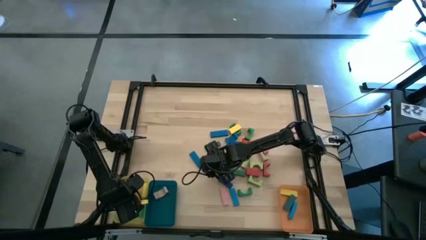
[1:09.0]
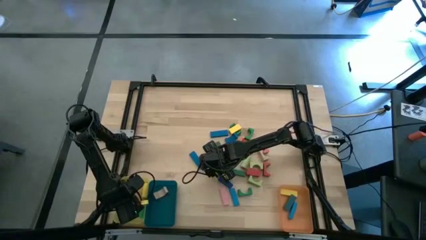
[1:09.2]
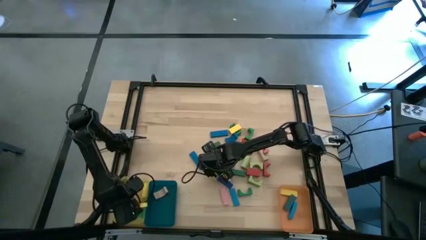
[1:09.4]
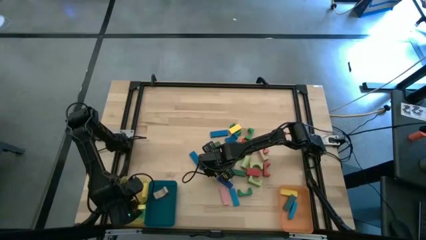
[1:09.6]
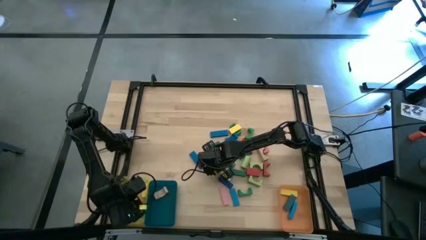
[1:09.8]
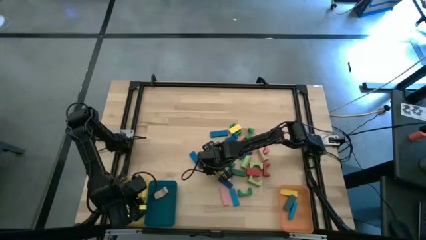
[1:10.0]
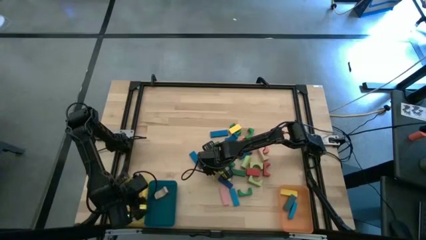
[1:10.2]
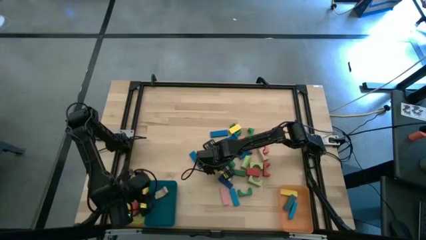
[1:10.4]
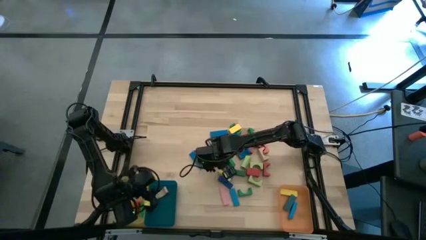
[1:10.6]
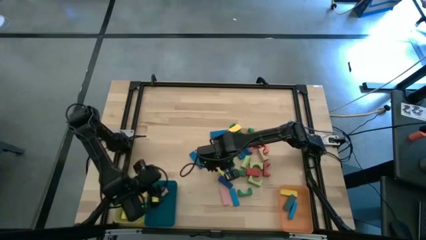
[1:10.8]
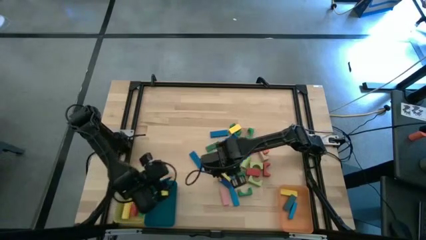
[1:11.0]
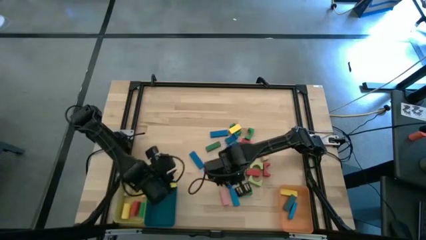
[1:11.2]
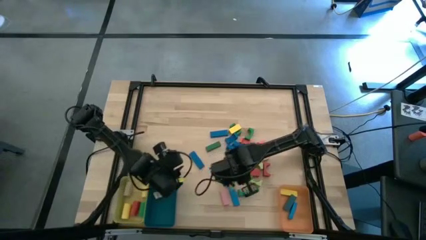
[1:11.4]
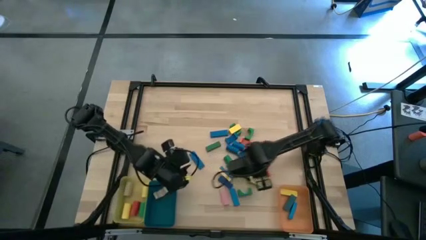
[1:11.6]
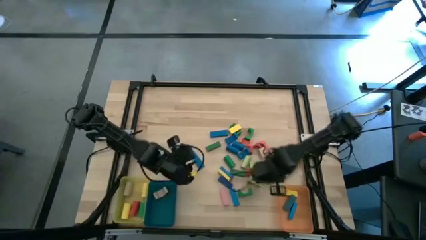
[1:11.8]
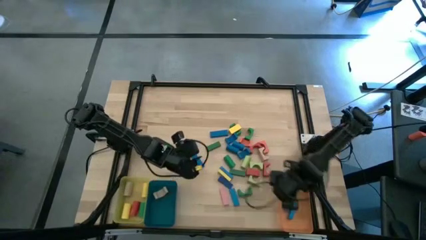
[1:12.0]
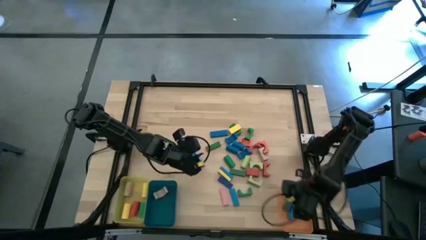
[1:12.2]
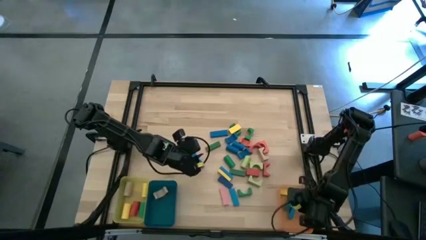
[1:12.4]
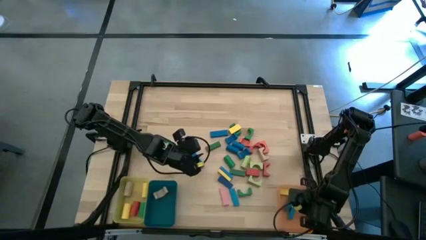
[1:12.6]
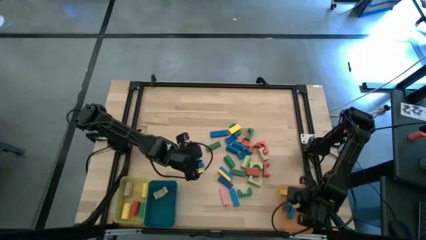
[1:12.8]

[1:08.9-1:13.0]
Task: Sort blocks by size
Put the blue rectangular block into the orange bin

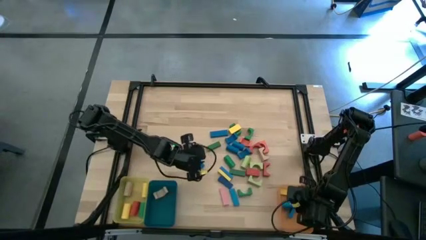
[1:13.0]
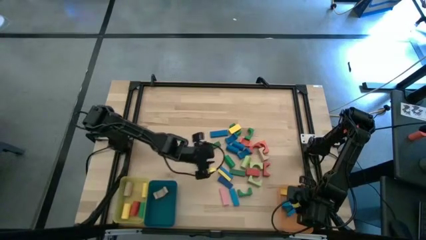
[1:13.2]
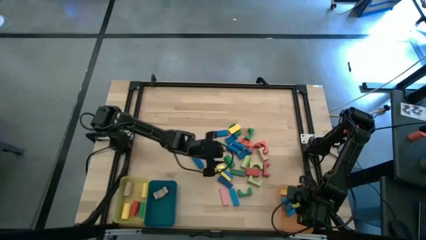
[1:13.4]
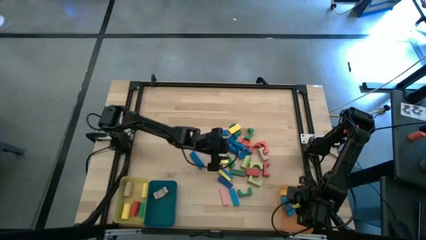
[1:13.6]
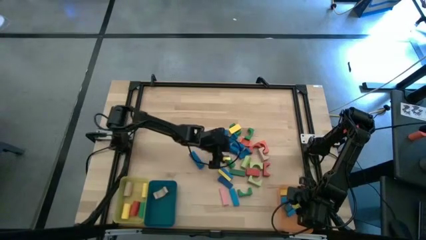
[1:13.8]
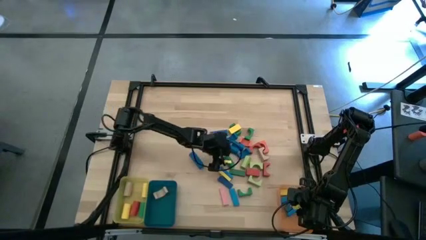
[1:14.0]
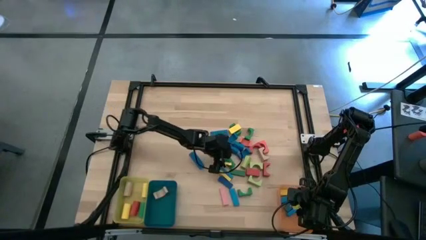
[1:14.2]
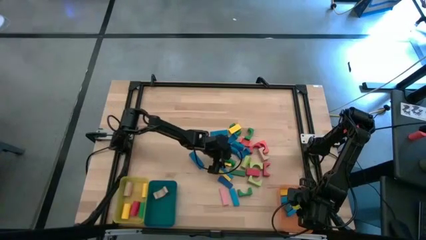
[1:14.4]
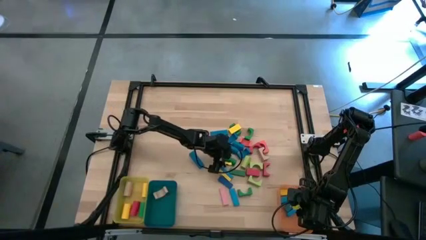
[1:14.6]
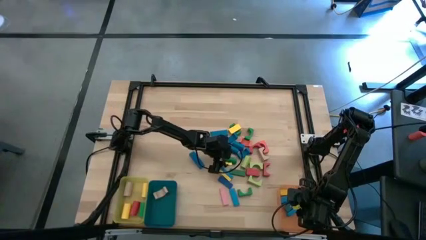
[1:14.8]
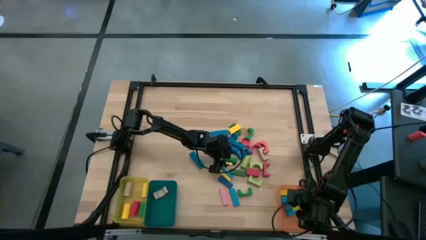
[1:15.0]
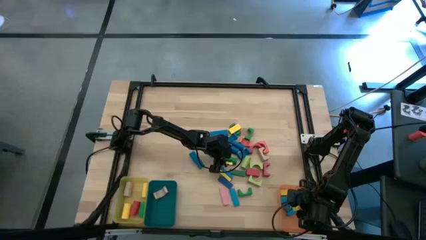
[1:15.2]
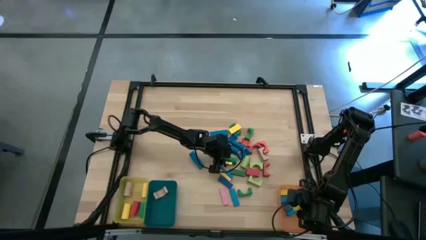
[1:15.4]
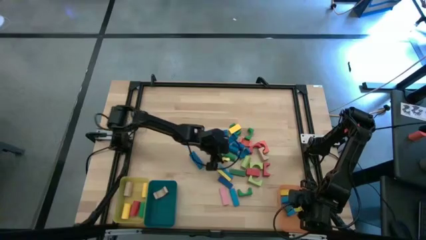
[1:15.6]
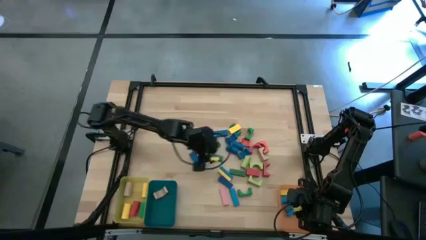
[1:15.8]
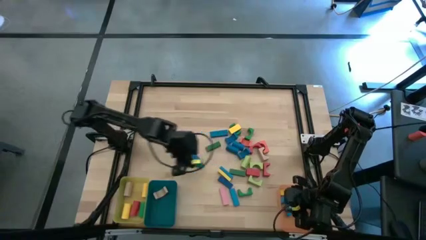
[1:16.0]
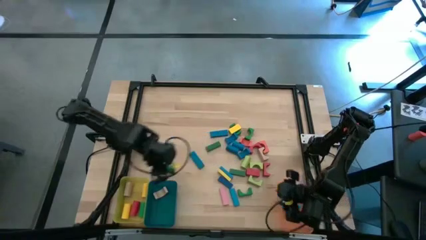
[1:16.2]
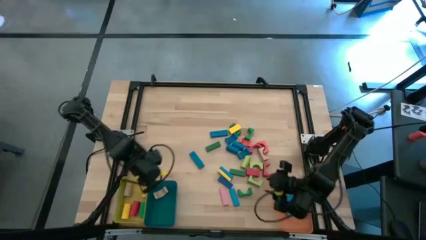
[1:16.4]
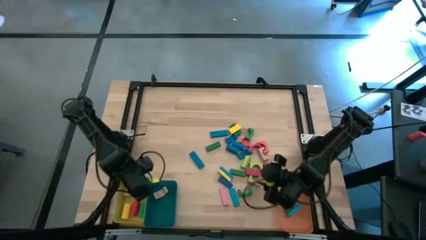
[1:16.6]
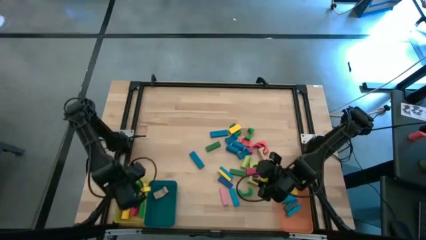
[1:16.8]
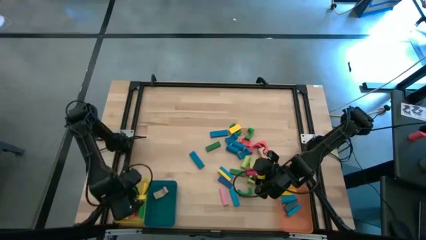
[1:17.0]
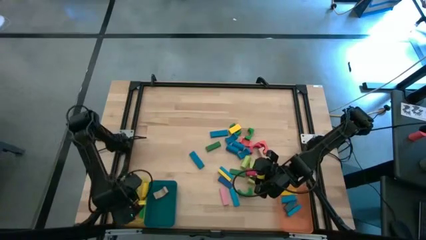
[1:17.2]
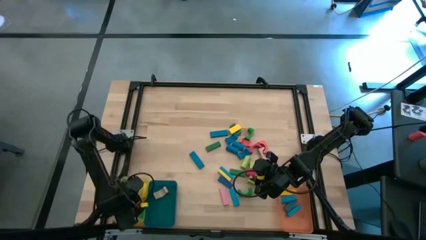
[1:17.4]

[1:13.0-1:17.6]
Put the green cylindrical block into the yellow bin

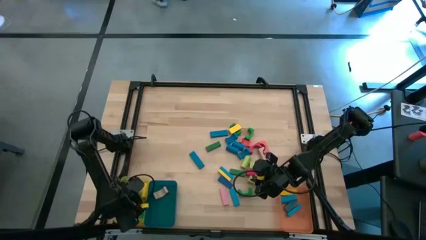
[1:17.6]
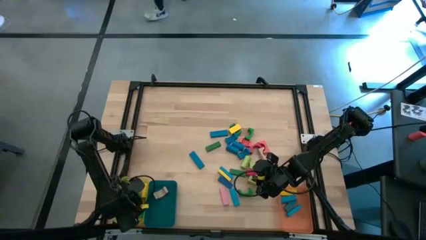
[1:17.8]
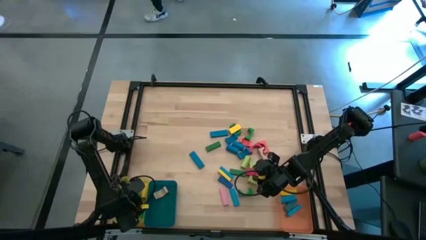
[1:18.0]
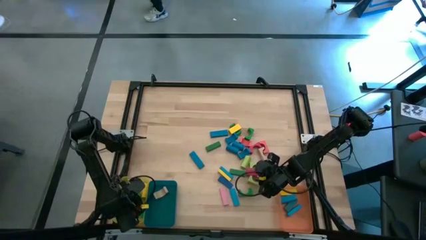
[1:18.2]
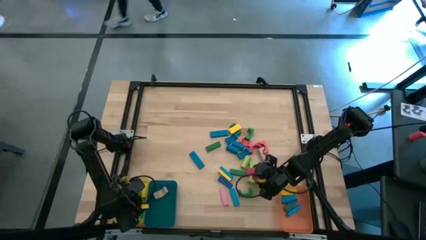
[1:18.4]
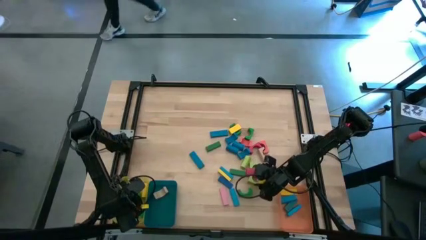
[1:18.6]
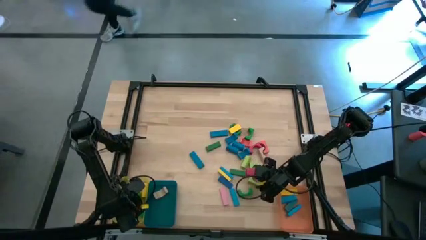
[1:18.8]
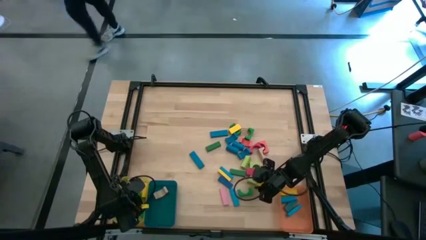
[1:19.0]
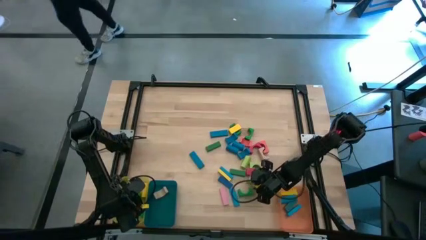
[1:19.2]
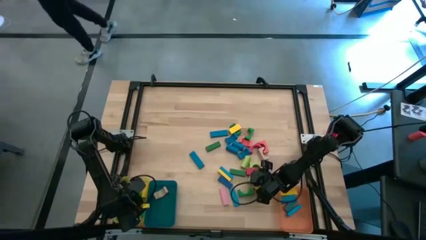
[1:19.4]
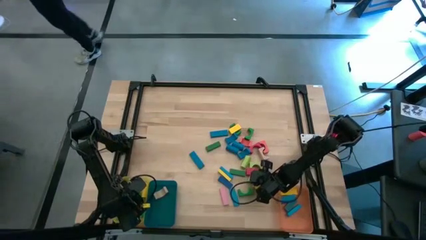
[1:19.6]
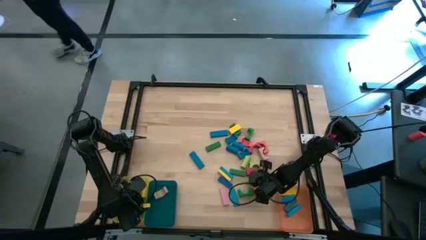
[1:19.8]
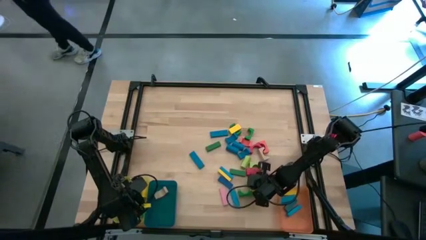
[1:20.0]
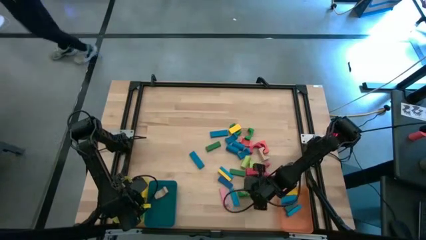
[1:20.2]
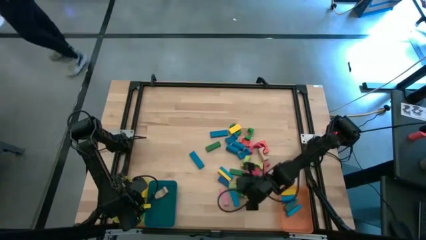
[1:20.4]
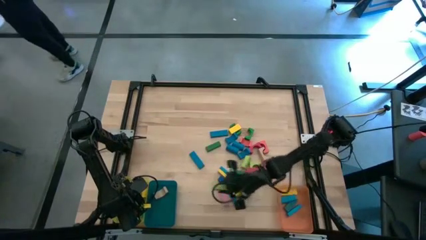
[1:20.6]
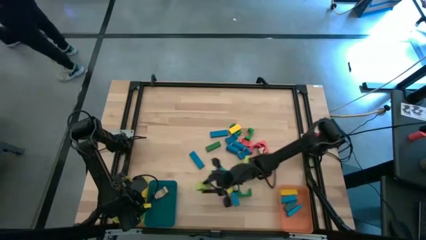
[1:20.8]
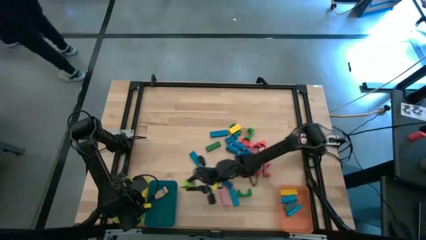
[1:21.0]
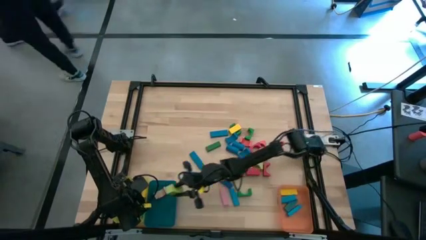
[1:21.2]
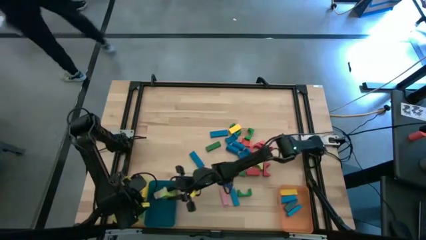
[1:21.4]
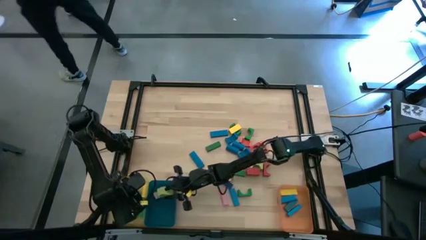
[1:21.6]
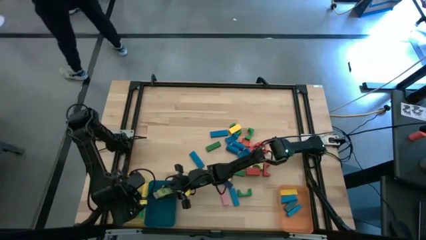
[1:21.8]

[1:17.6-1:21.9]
Put the light green arch block into the blue bin

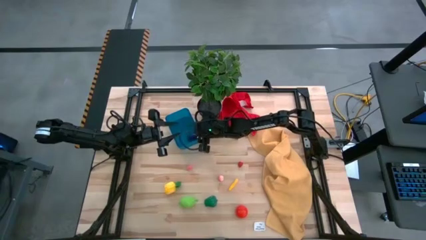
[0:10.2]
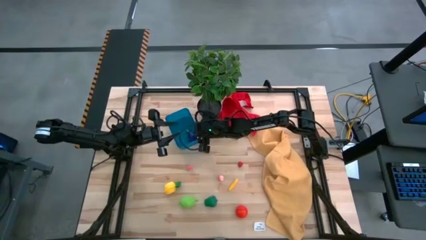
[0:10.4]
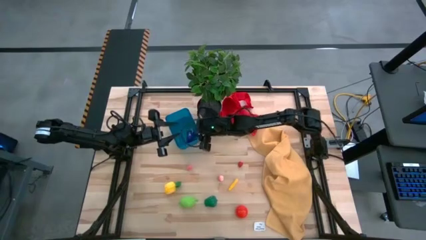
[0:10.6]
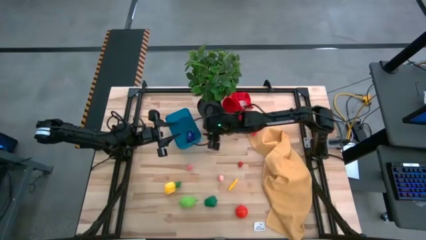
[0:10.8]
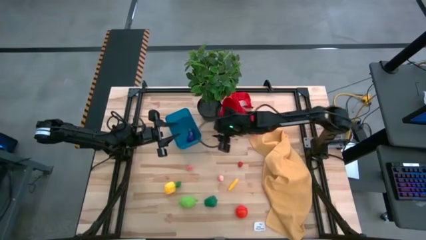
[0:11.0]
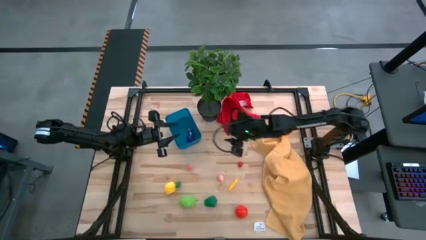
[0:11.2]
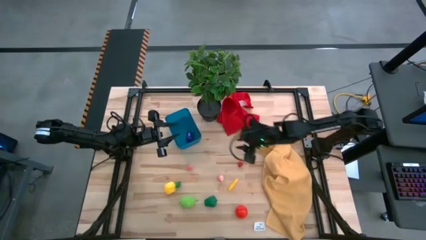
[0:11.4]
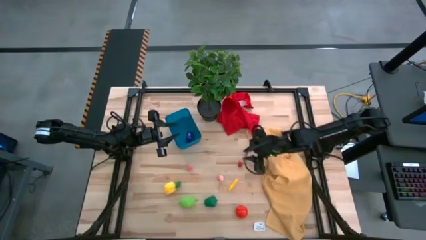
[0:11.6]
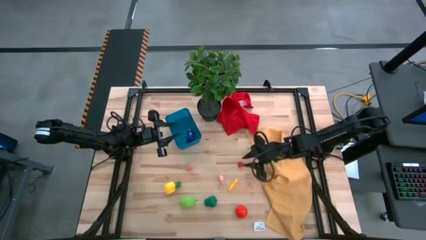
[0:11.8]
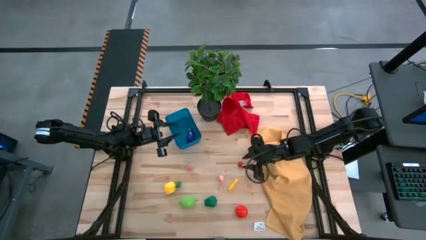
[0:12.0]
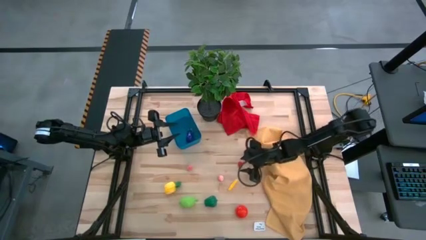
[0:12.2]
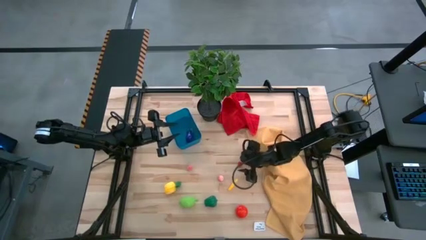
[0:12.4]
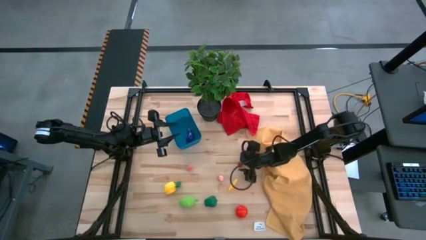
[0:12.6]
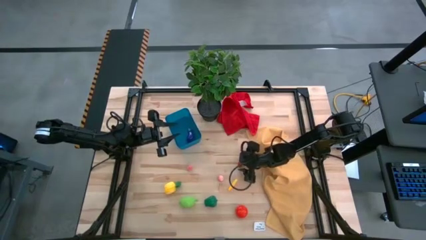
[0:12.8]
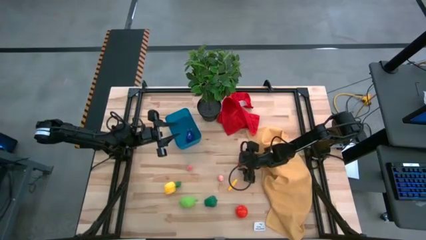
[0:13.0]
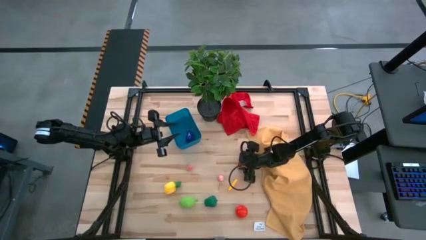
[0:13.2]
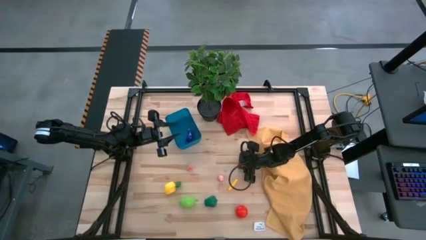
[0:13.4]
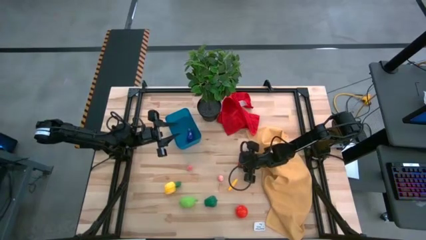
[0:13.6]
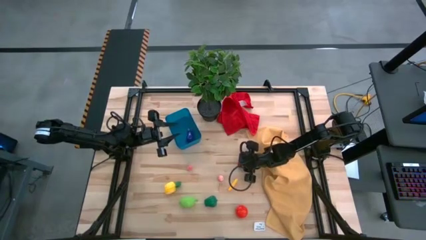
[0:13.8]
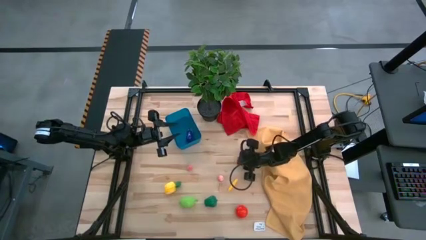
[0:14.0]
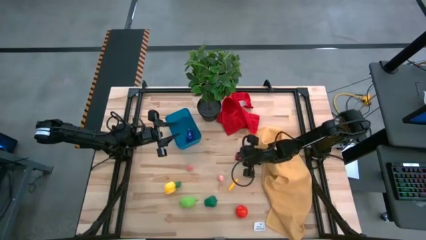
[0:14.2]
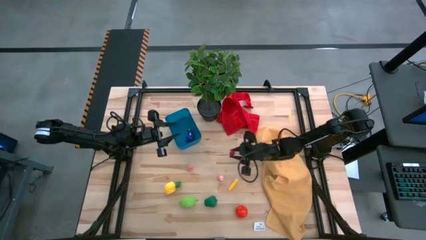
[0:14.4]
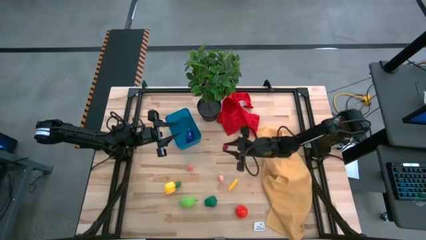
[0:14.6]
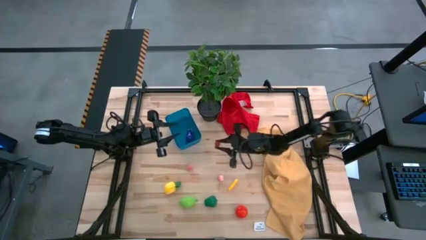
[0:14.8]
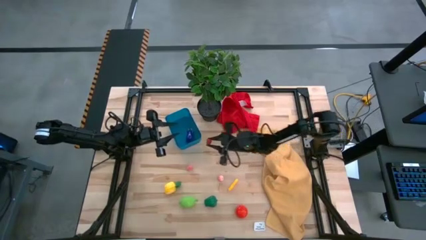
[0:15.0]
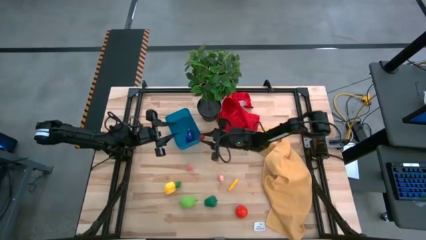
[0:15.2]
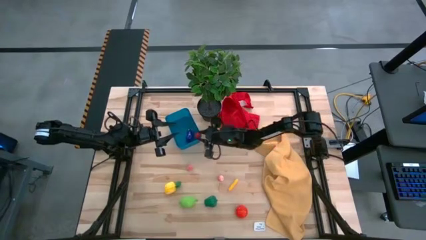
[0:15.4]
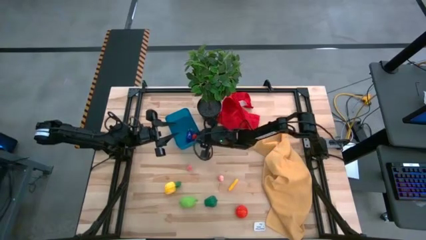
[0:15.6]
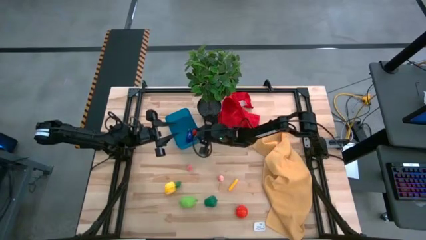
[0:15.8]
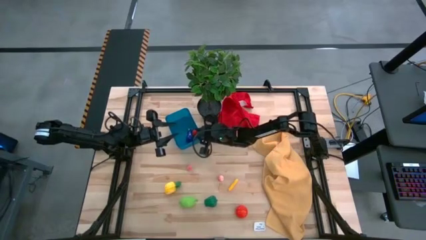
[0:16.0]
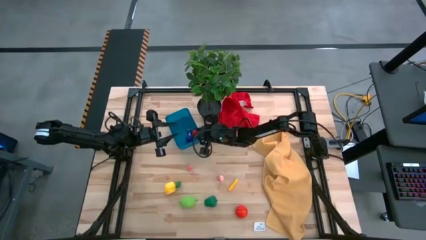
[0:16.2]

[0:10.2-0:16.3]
Task: Pick and placing Produce into tupperware
Put the red raspberry into the blue bin
